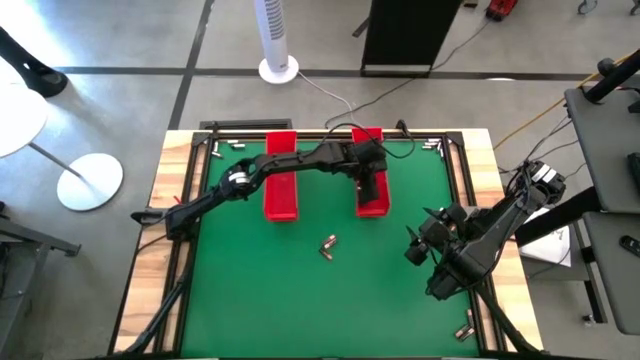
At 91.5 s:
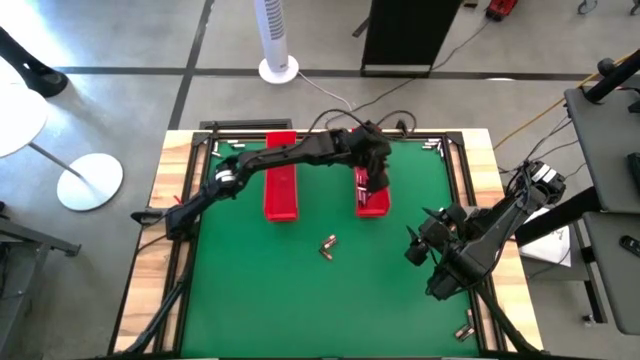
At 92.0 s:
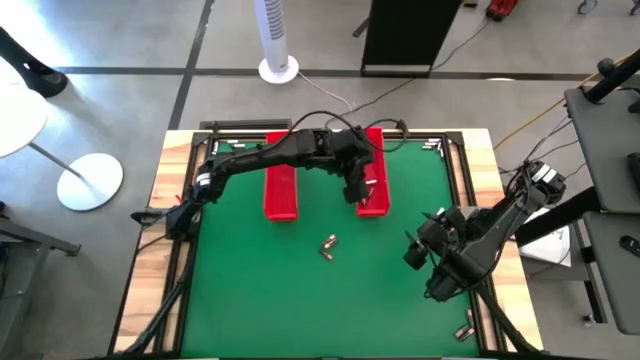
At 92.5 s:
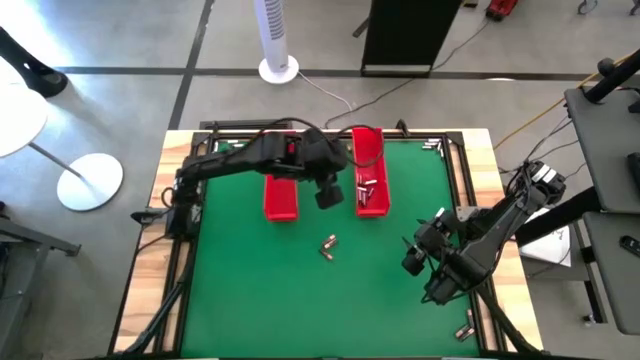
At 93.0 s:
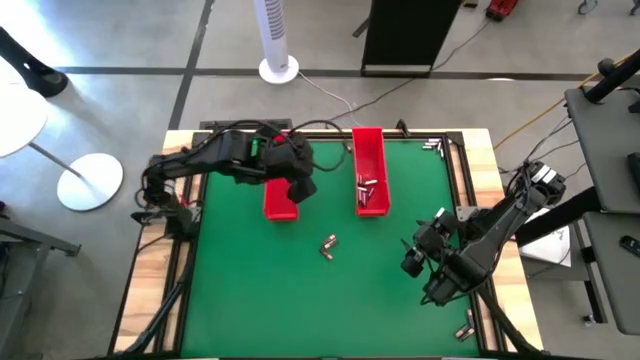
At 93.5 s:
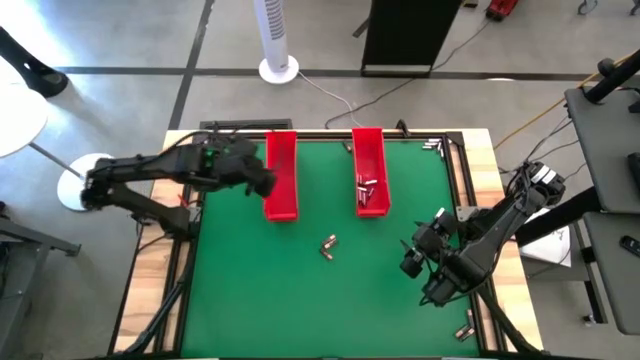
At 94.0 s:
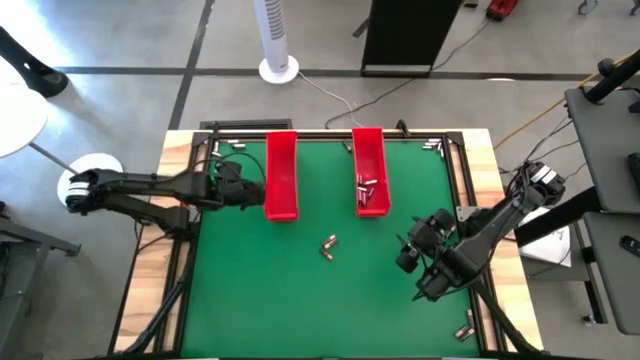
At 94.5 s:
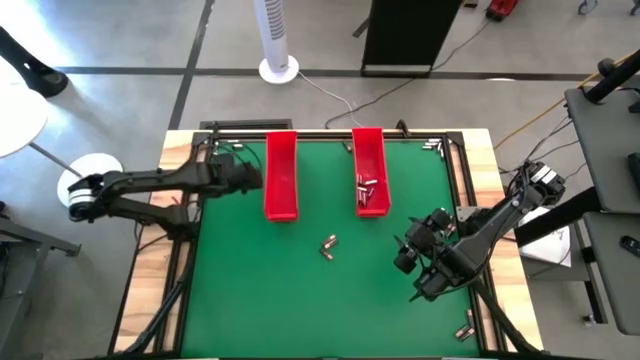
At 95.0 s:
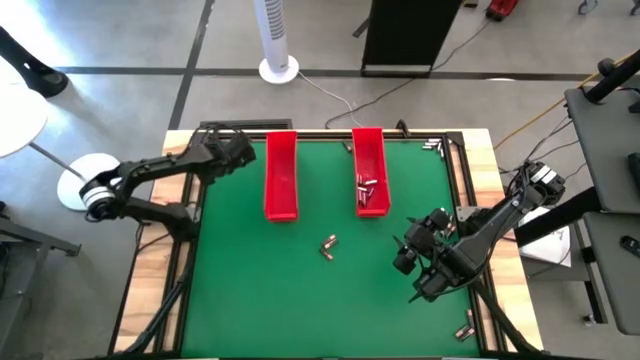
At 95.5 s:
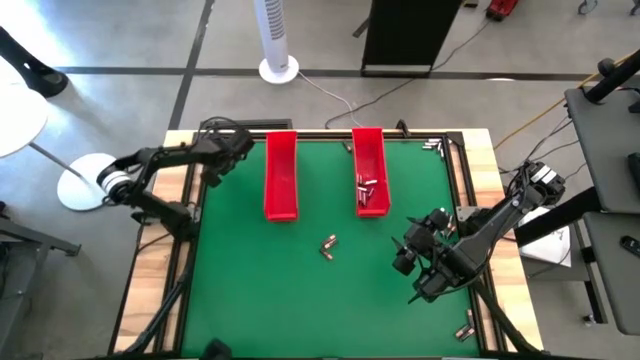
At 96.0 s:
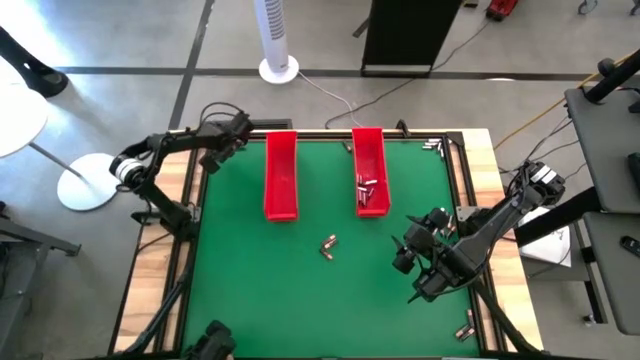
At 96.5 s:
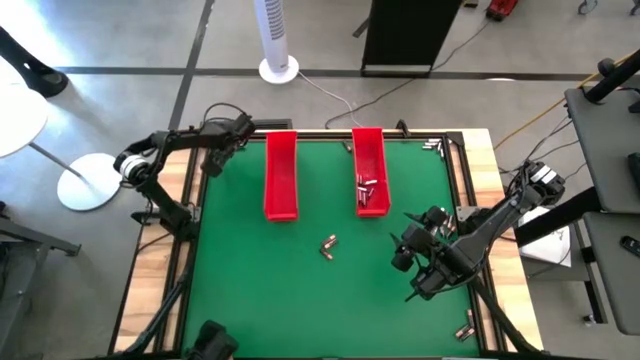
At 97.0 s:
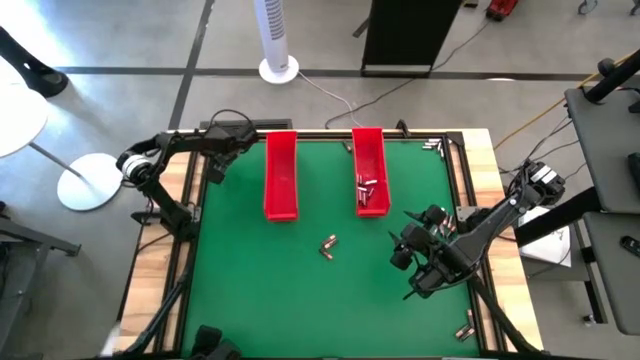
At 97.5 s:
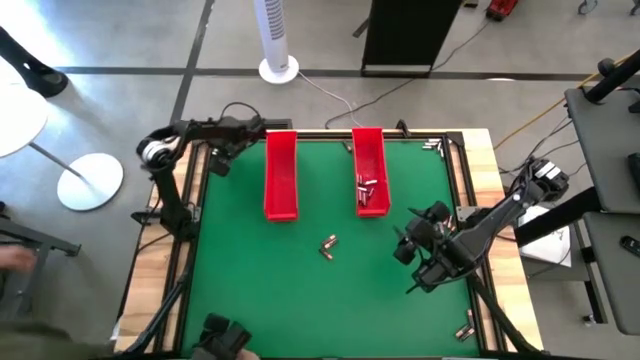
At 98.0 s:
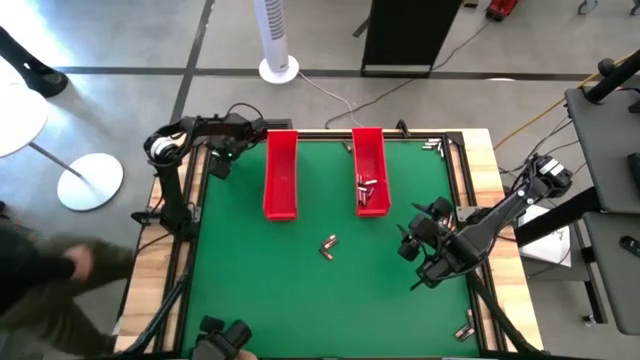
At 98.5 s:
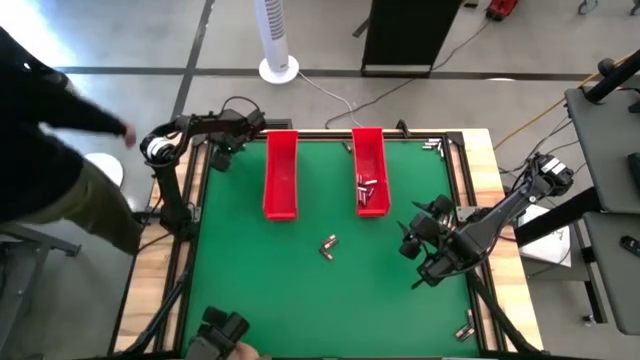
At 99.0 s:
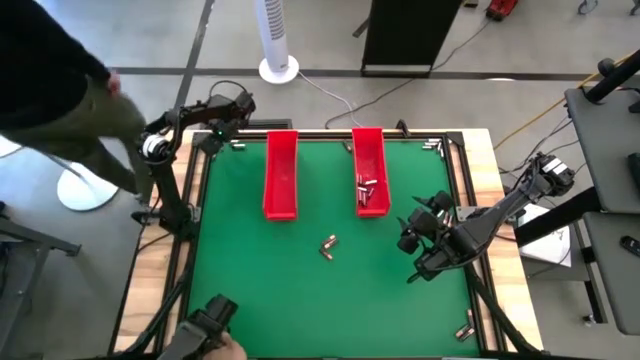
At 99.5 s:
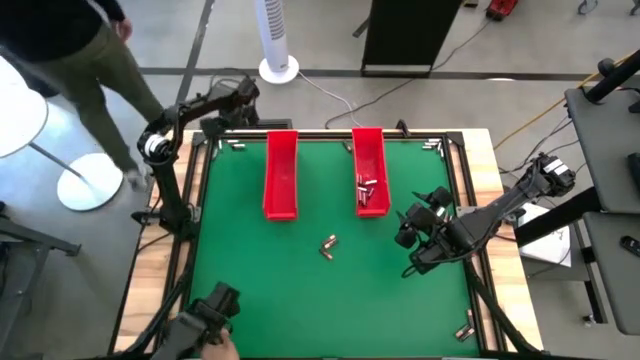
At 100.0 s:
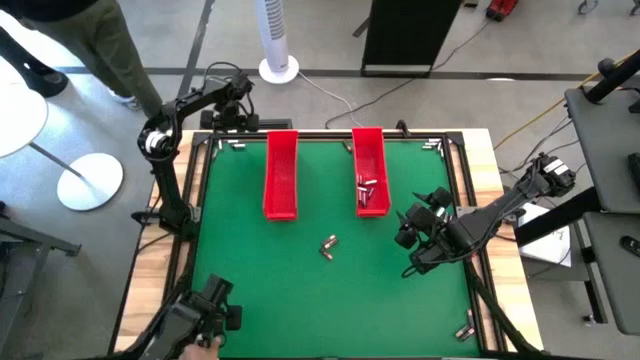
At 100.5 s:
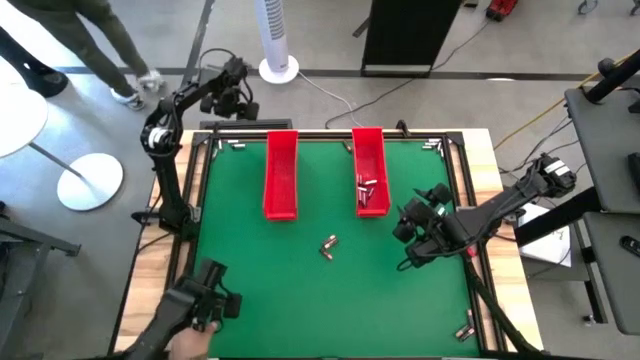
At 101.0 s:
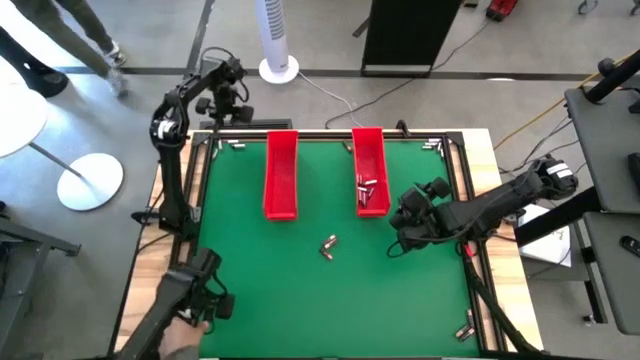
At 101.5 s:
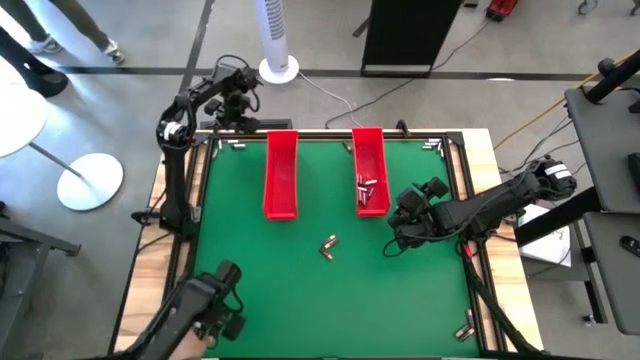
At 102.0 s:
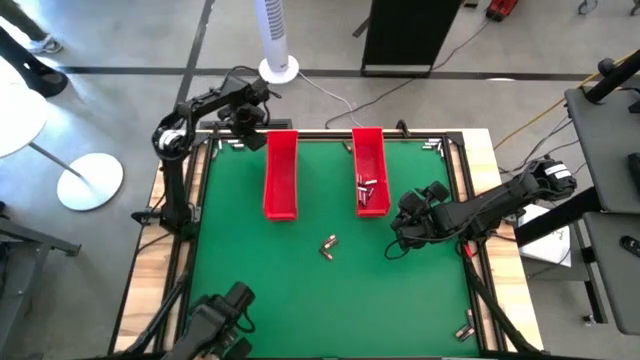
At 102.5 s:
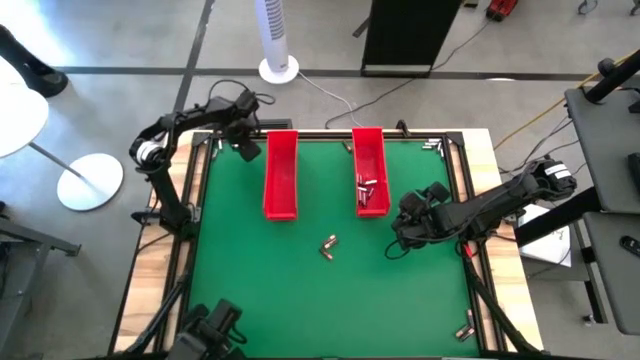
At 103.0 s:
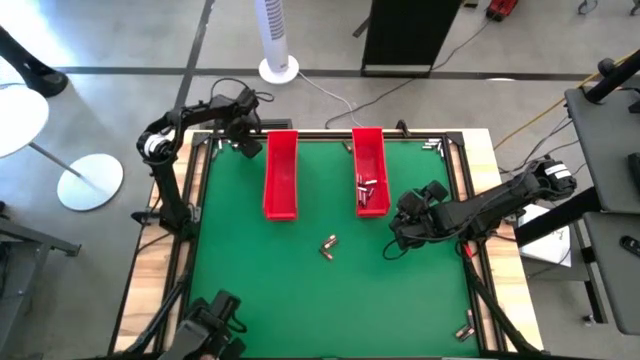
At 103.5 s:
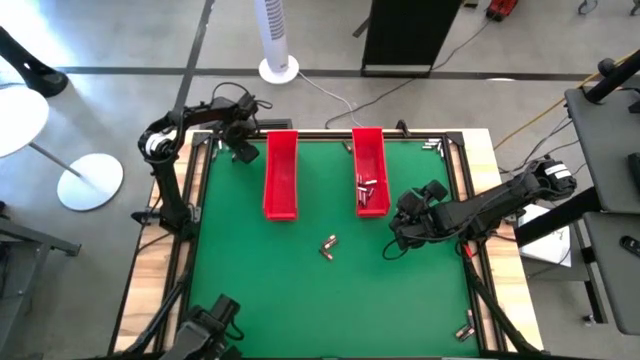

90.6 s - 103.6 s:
Task: Sort batteries
Put the silver battery into the right red bin

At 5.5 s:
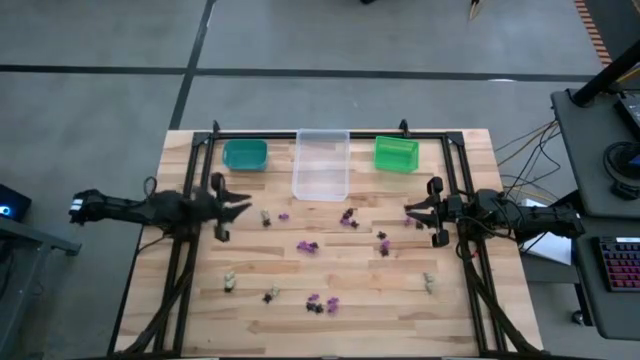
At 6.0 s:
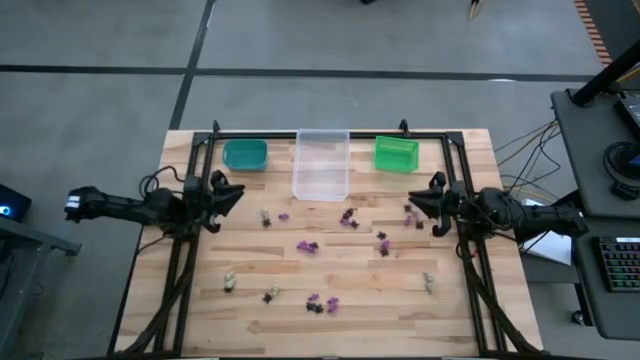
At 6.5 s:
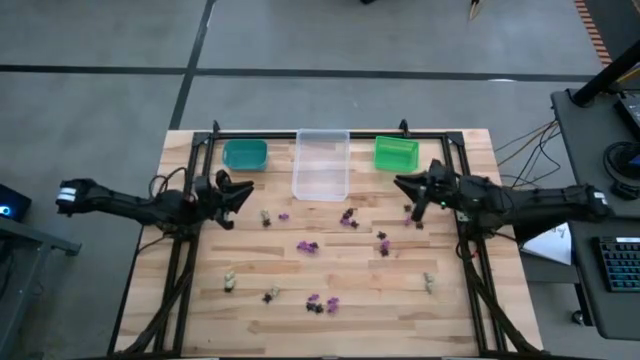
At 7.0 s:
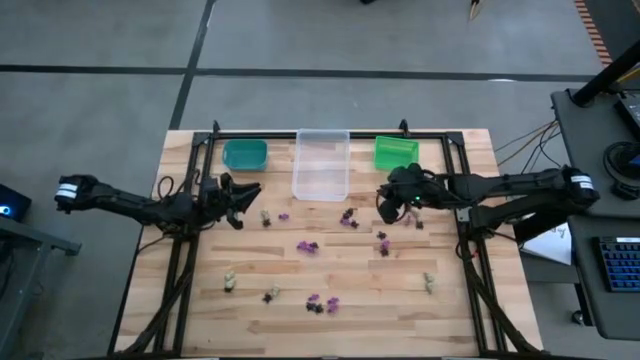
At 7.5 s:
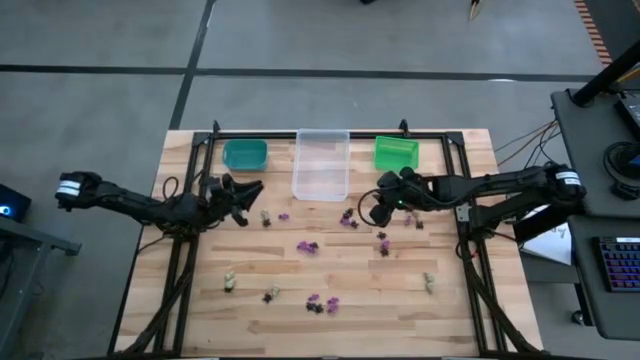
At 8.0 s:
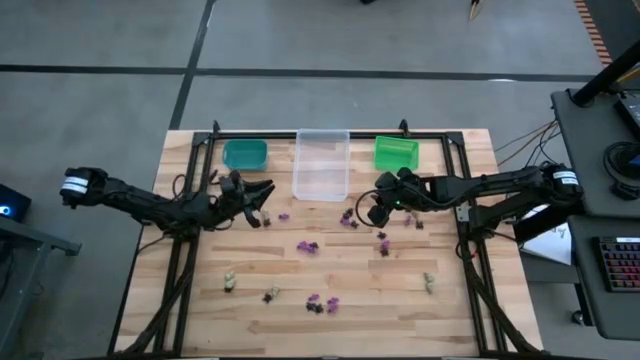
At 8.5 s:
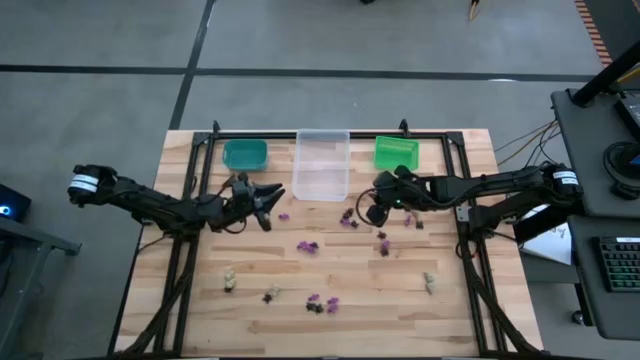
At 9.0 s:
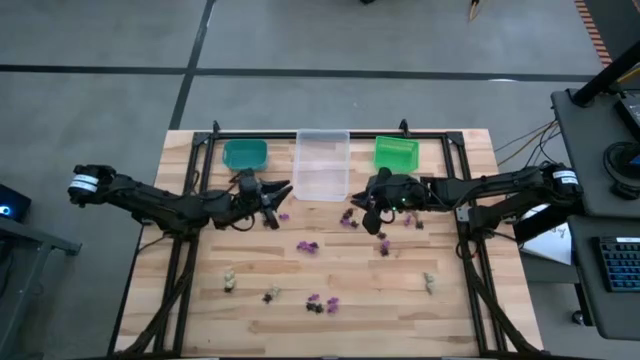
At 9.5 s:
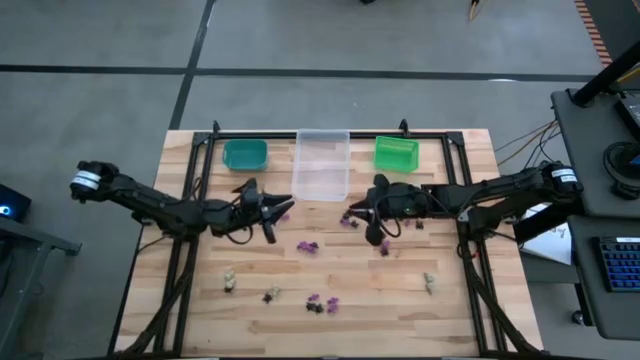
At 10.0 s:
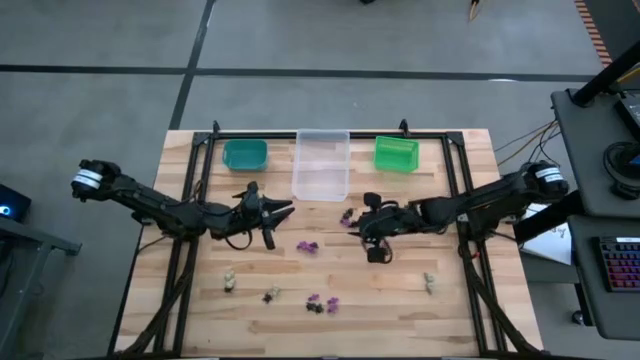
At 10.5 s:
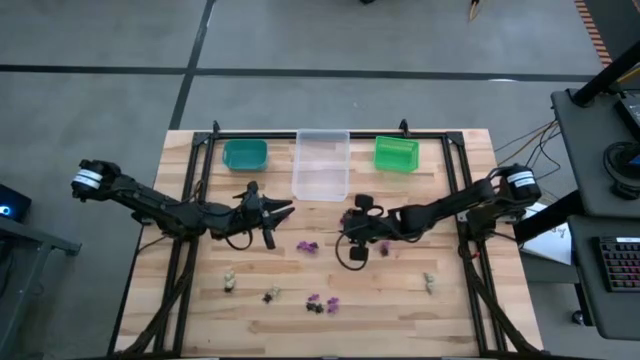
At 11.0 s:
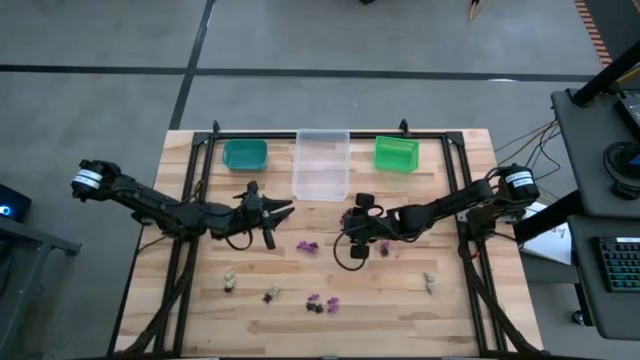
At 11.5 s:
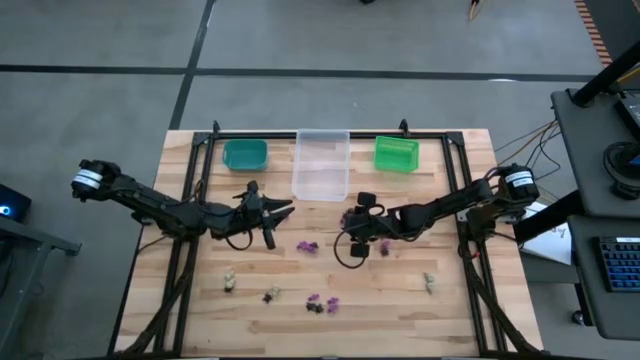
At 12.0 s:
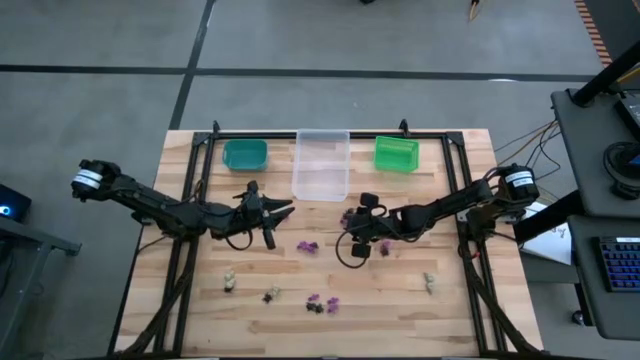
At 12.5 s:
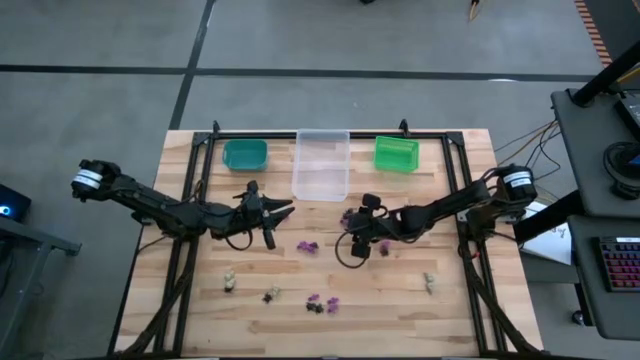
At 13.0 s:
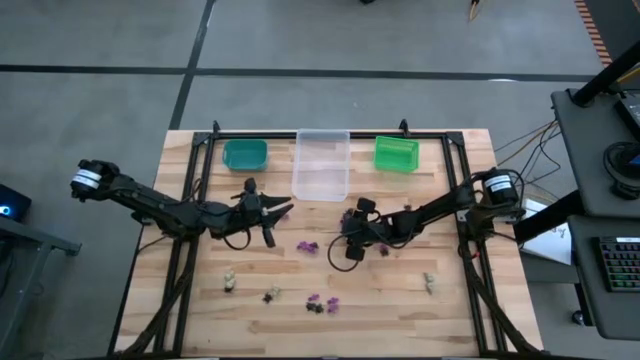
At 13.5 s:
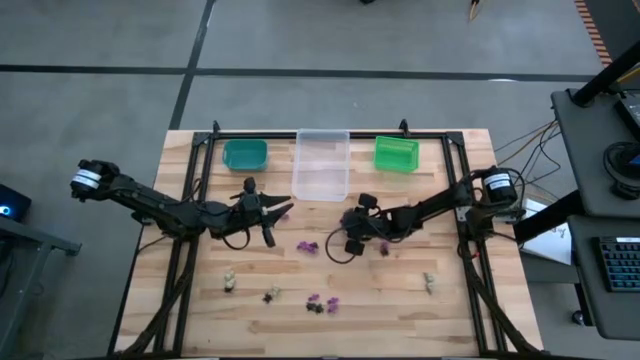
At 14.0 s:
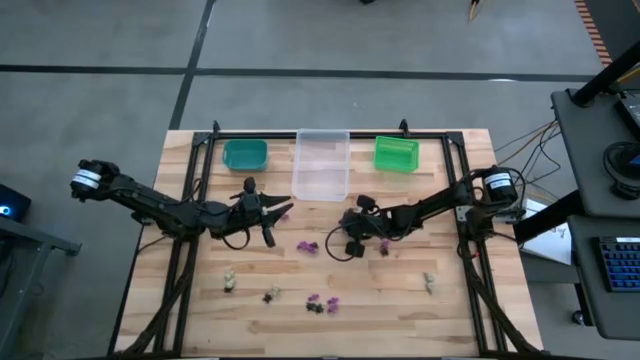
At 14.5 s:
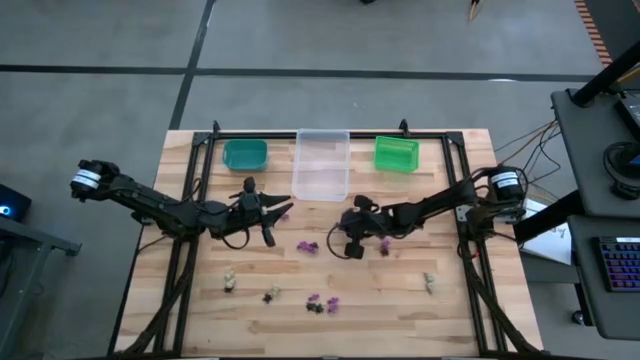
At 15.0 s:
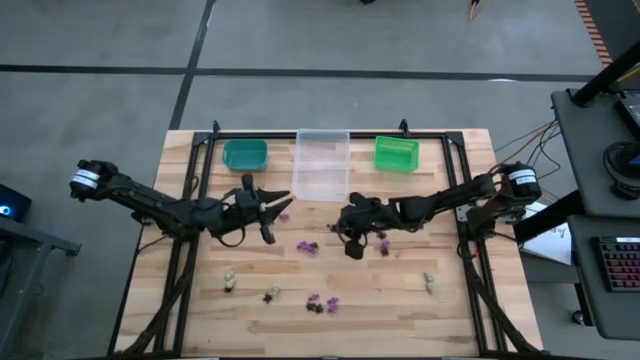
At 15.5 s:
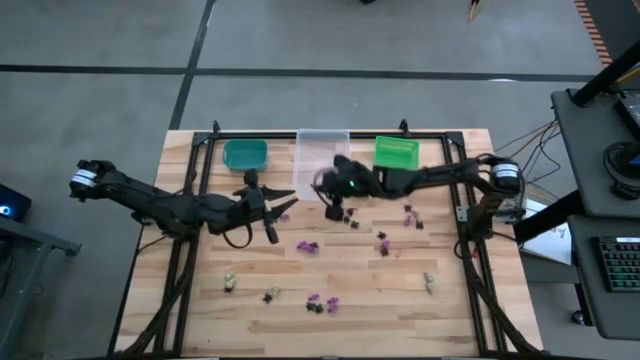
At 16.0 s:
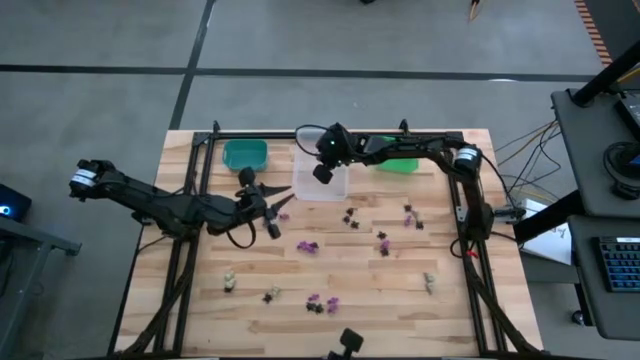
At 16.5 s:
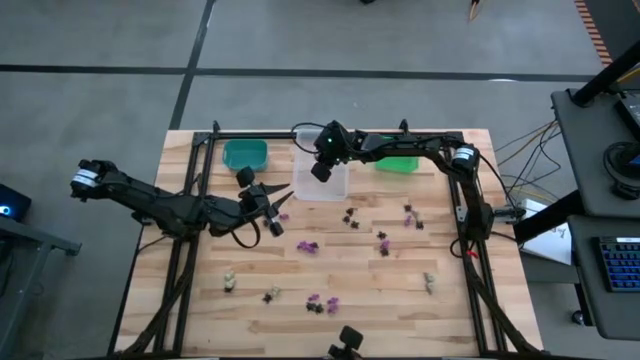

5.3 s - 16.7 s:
Task: Sort Halloween decoration
Put the violet skeleton toy into the transparent bin
